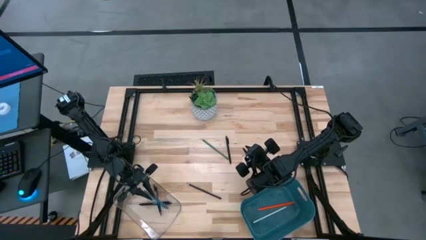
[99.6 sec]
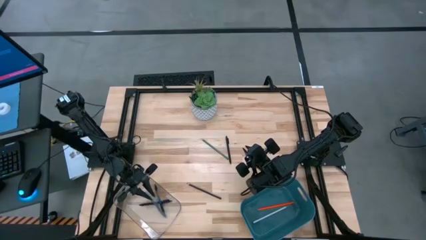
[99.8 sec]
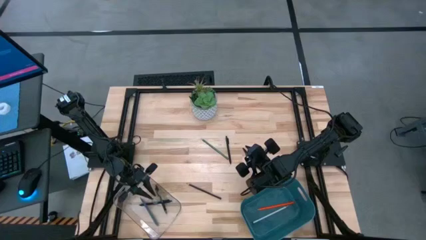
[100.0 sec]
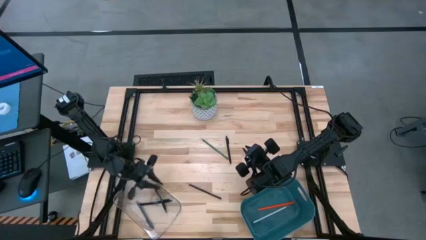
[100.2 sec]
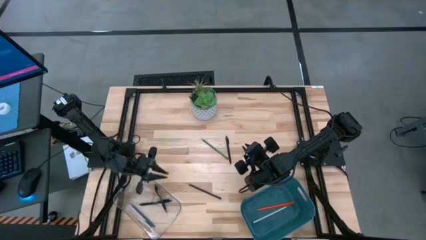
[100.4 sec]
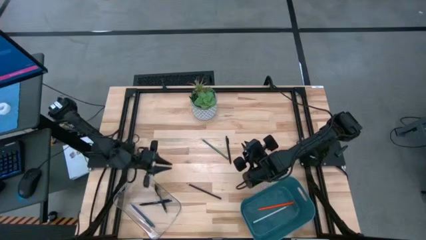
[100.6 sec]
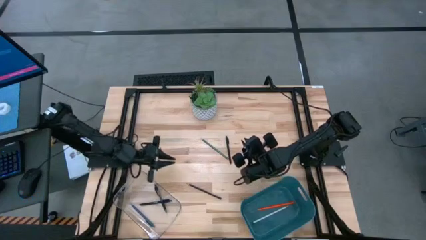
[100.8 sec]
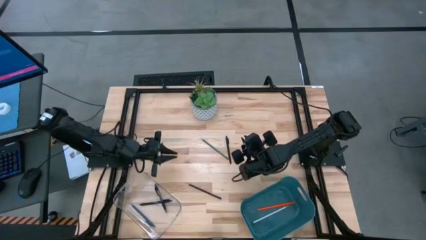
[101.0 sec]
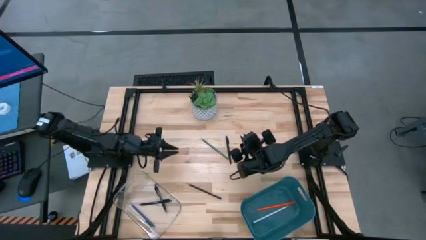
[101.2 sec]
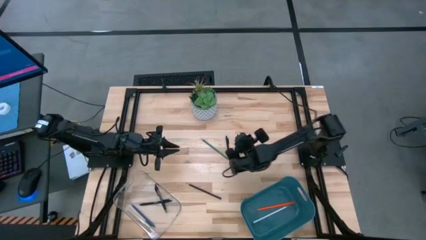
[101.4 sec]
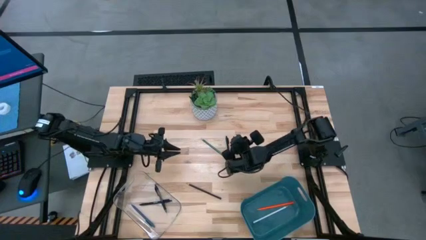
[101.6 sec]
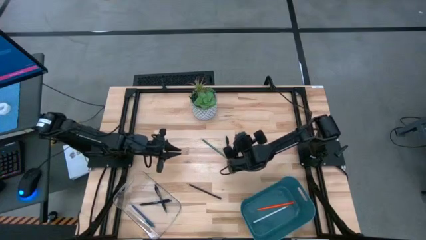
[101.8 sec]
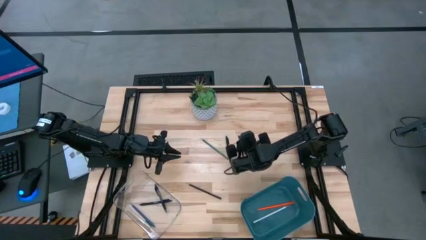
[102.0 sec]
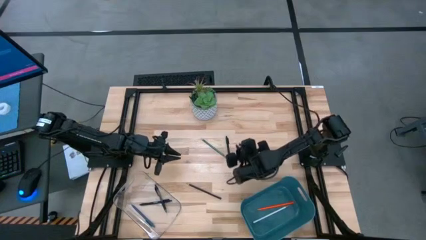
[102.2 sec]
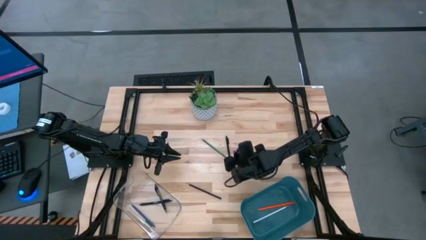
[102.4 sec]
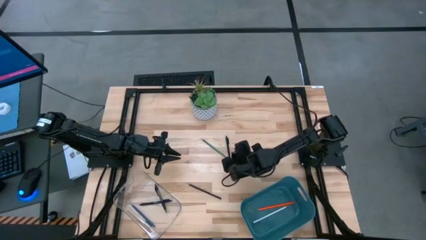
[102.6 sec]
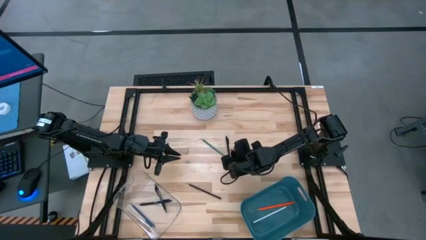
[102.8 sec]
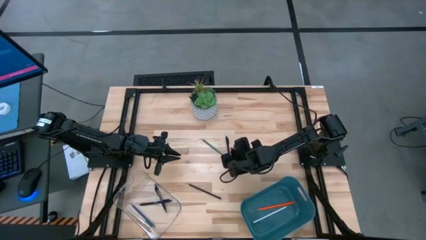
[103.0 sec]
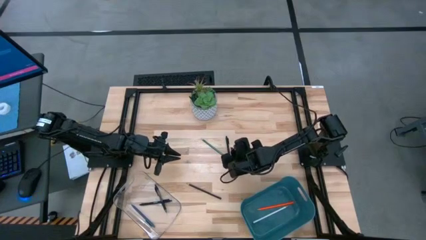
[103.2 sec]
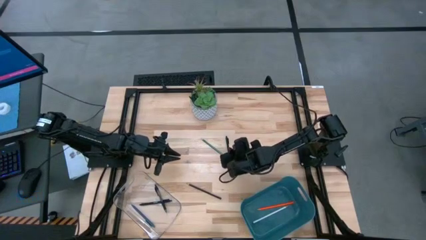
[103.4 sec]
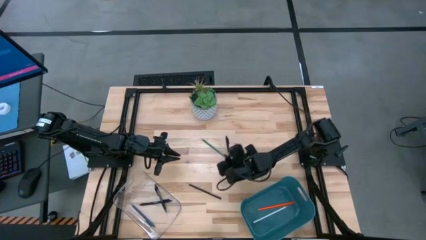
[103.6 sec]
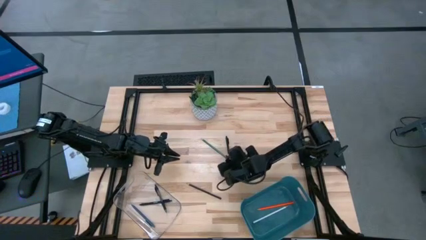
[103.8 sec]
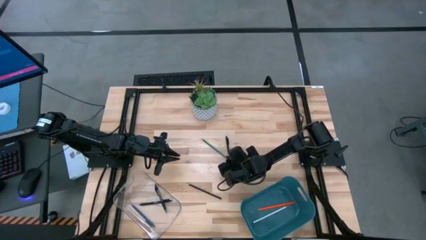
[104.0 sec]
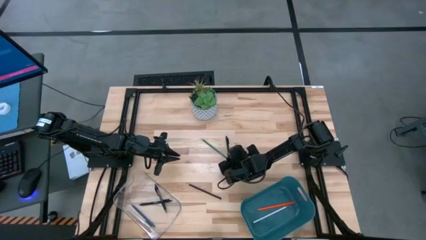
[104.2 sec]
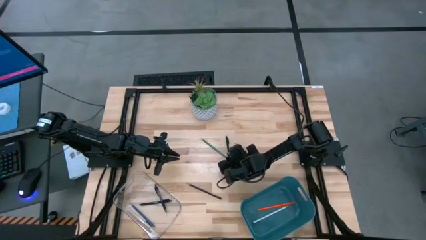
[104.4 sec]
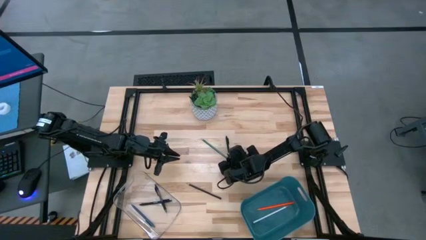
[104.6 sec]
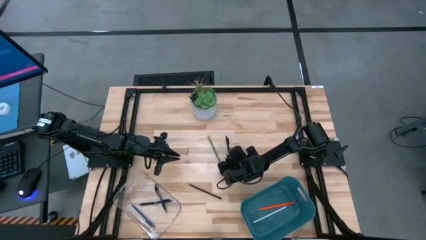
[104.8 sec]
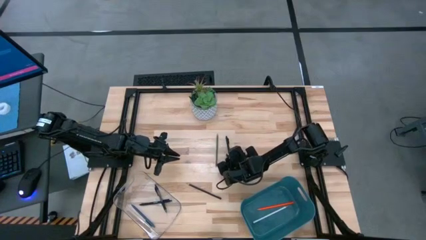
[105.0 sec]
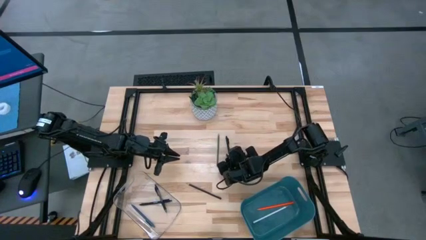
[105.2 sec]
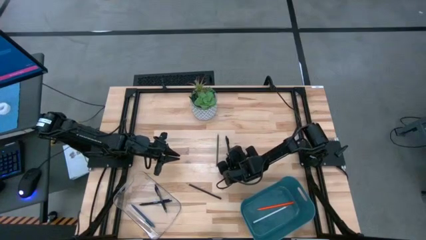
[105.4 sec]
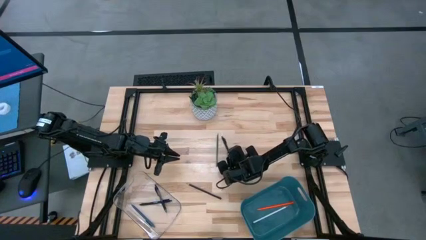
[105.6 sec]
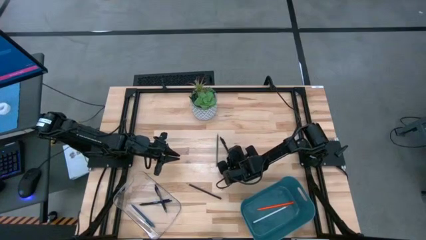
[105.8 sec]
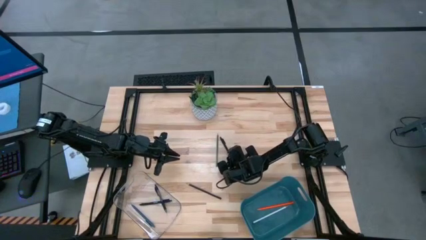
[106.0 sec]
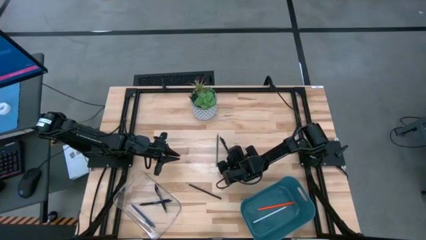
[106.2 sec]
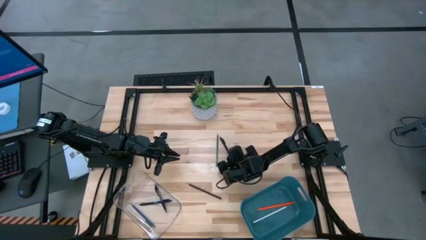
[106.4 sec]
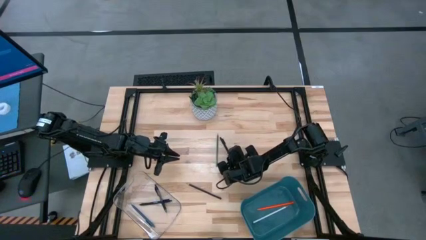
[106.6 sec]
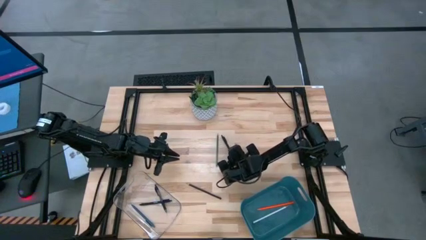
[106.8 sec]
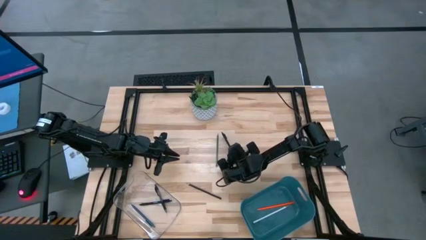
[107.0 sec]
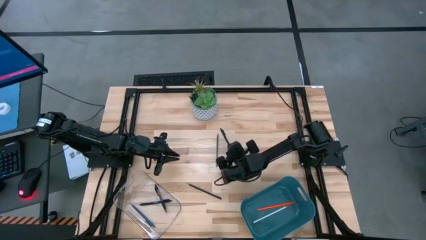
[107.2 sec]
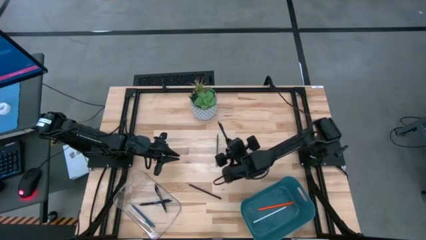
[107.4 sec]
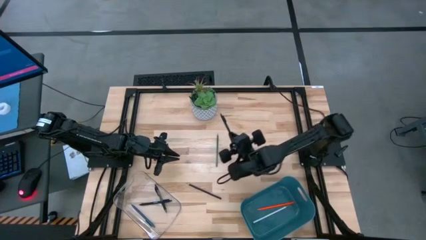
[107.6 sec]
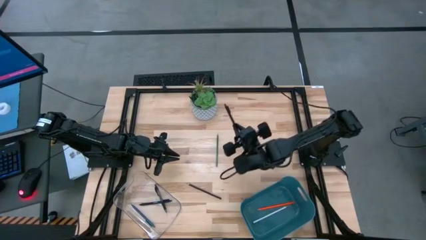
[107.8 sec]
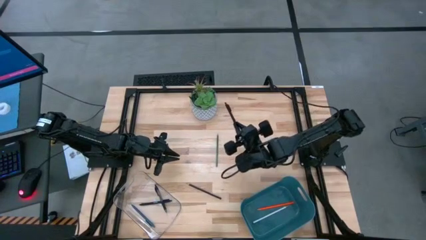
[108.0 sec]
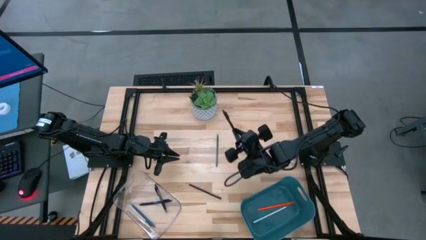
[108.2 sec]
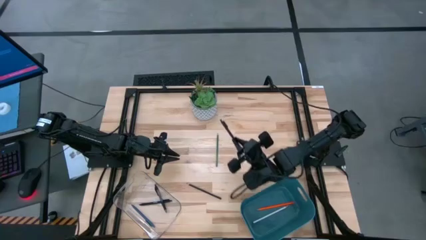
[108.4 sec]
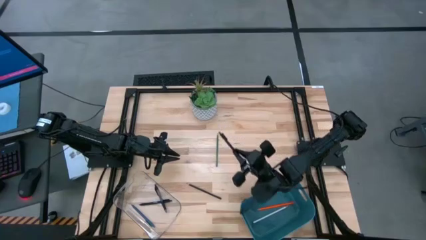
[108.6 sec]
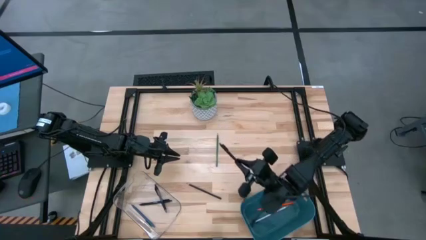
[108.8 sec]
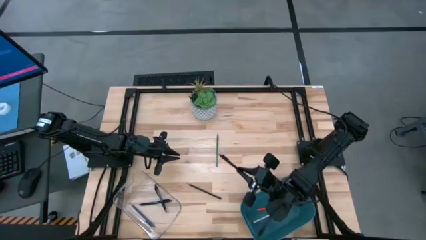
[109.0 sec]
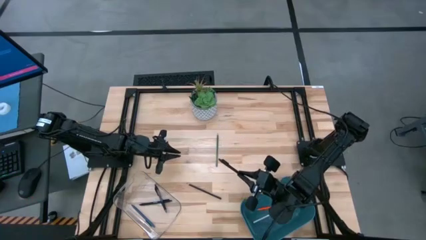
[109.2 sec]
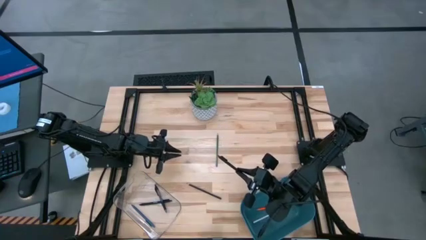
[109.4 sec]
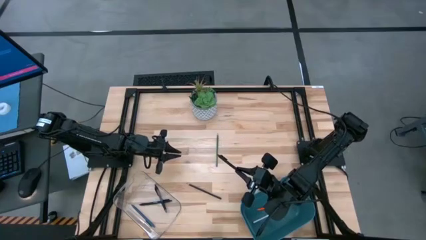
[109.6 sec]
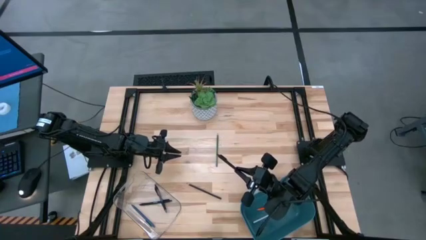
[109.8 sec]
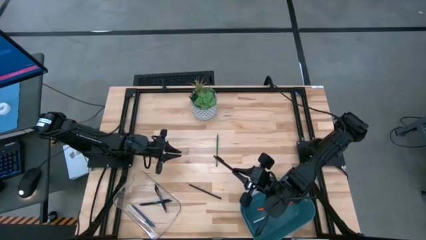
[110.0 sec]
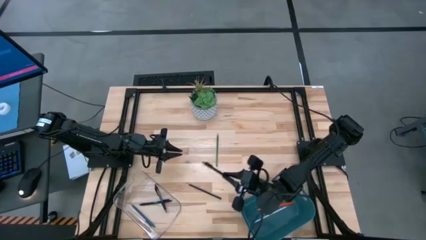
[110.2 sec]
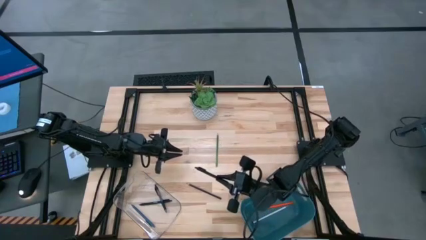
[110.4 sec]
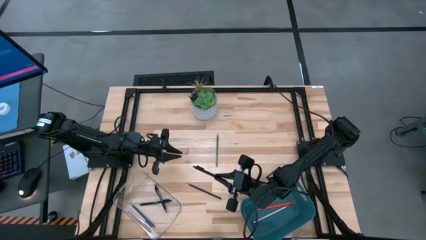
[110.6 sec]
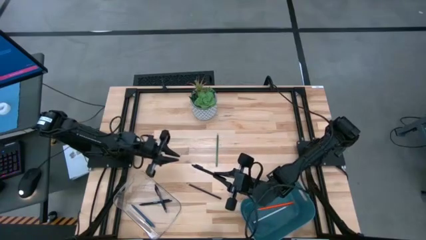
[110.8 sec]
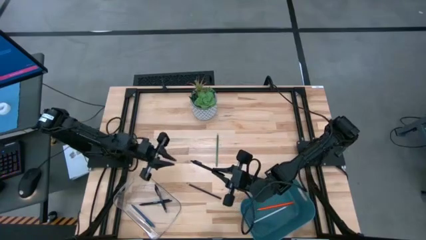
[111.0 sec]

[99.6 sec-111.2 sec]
Task: Sort pens & pencils
Put the black pen into the transparent bin

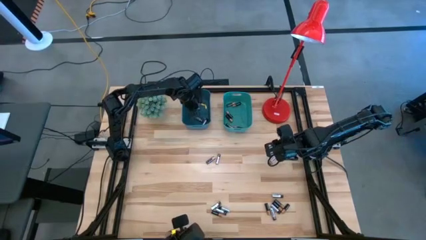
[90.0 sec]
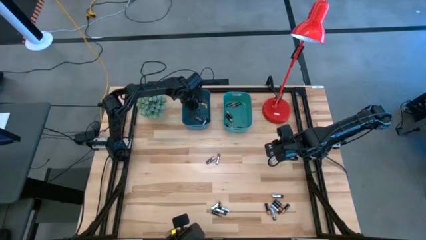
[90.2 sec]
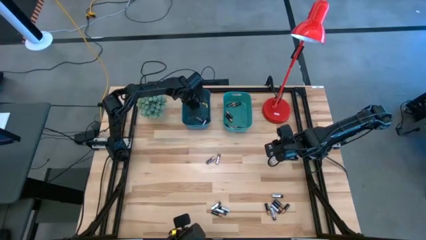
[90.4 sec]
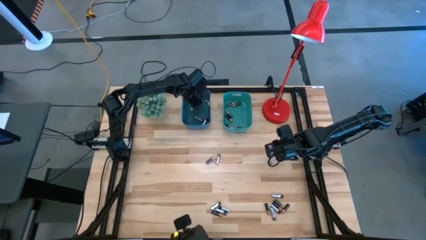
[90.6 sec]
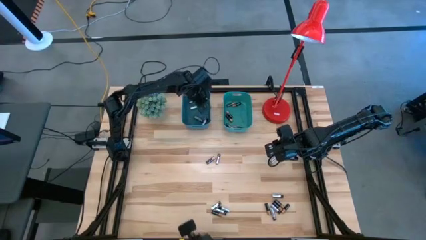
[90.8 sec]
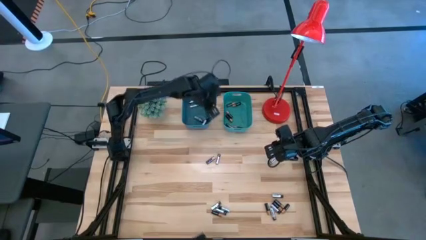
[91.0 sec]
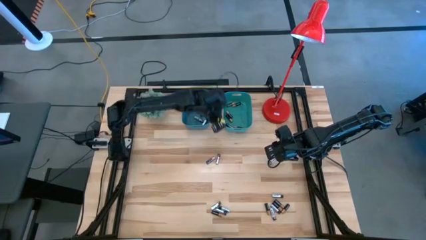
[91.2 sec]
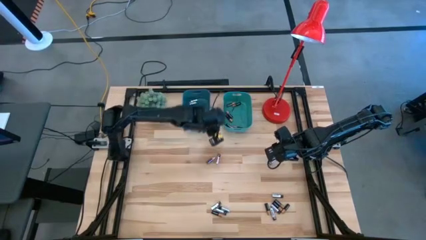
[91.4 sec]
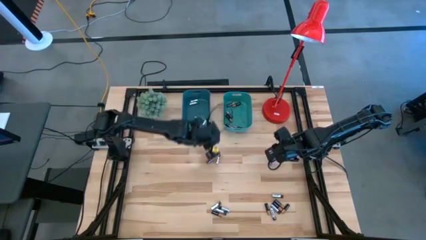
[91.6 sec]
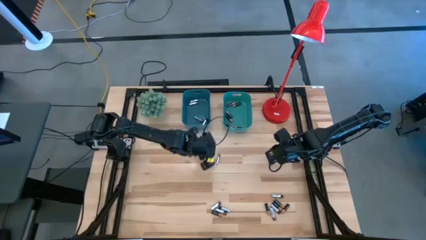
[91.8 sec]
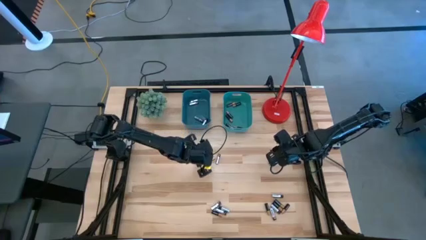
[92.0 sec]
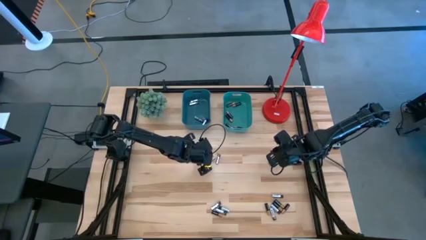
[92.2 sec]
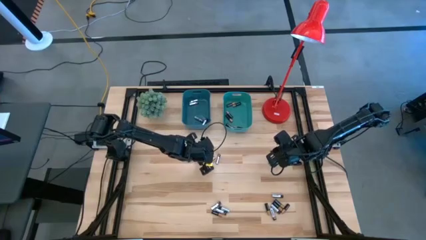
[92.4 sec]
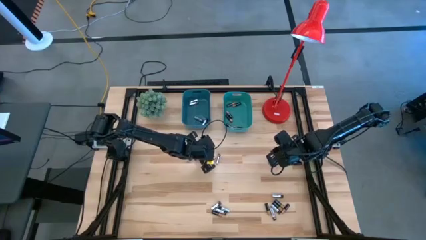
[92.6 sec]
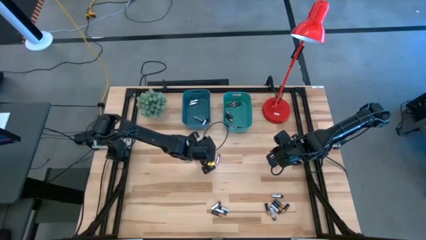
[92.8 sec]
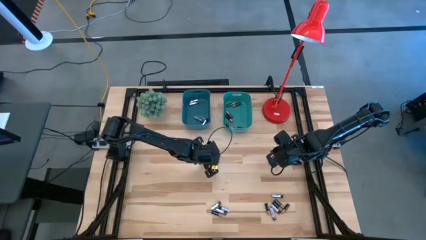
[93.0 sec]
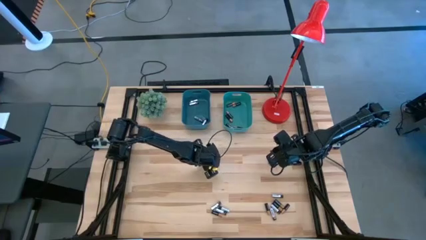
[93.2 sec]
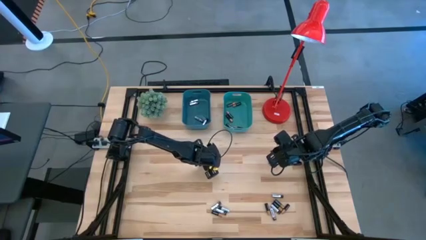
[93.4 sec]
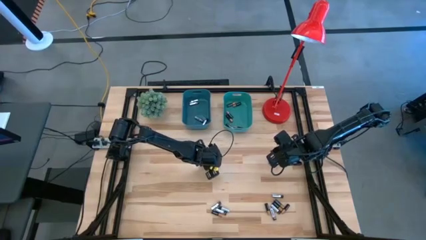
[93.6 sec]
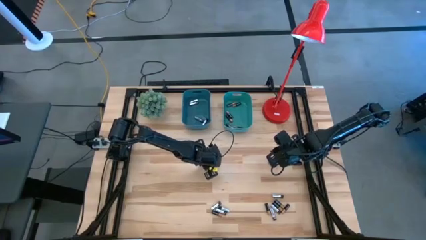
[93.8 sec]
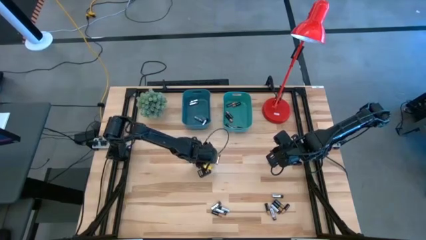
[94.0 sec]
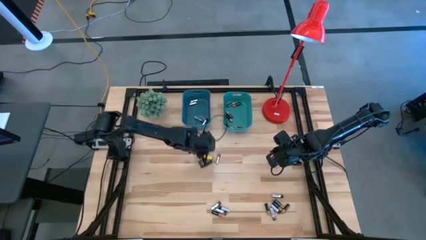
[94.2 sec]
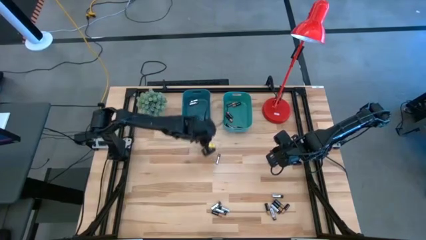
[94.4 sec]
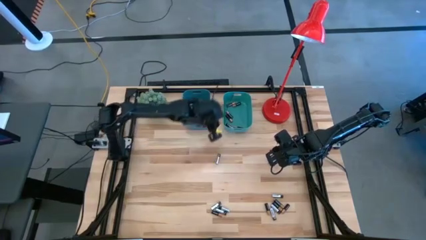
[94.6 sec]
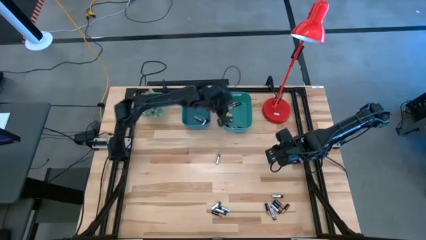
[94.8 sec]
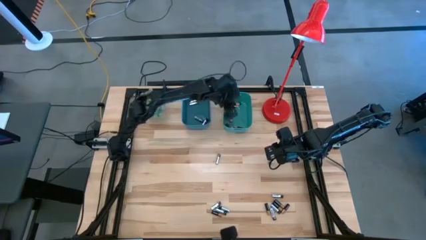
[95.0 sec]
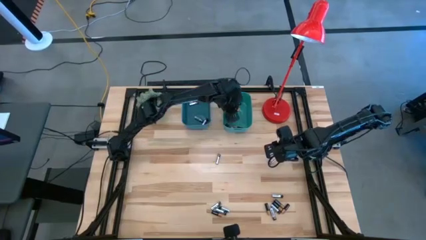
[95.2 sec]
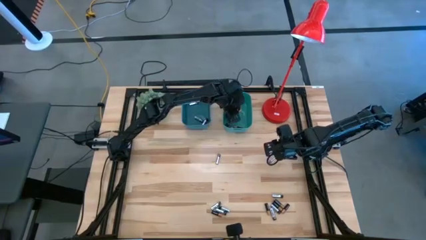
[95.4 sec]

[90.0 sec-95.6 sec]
Task: Sort batteries
Put the black battery into the green bin
